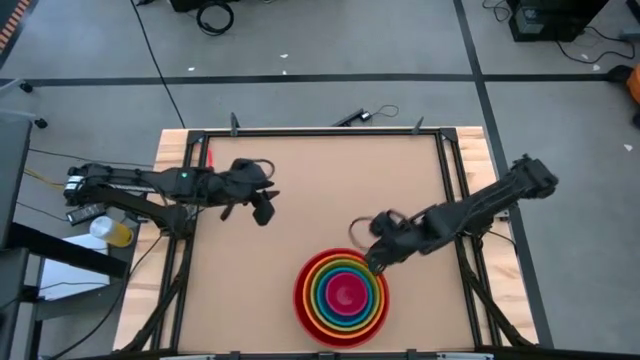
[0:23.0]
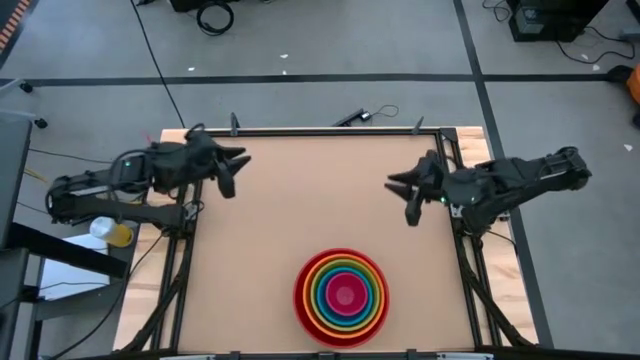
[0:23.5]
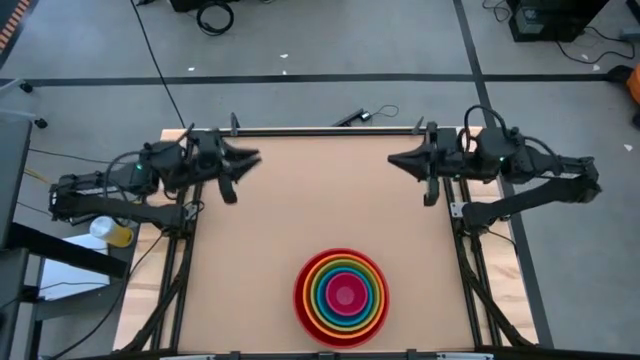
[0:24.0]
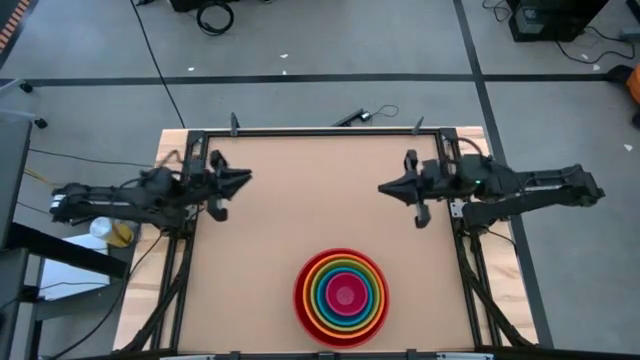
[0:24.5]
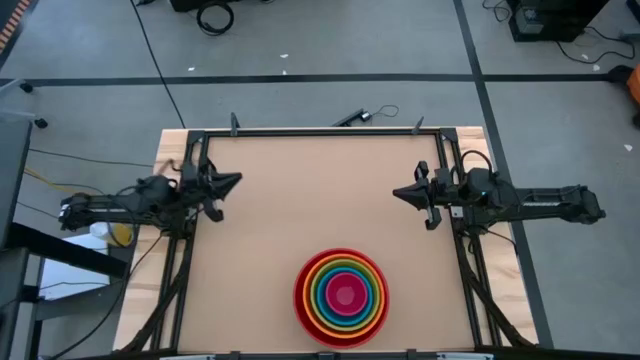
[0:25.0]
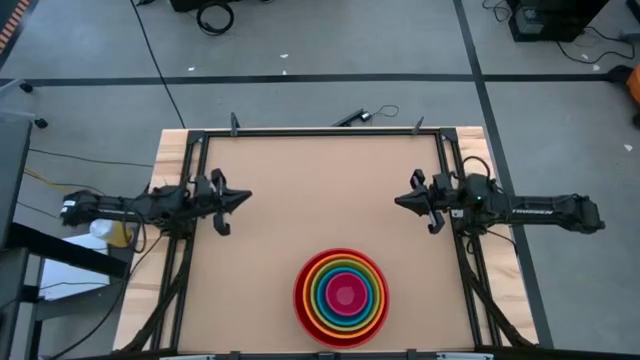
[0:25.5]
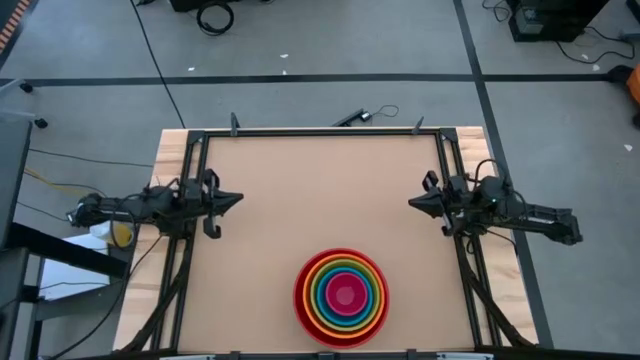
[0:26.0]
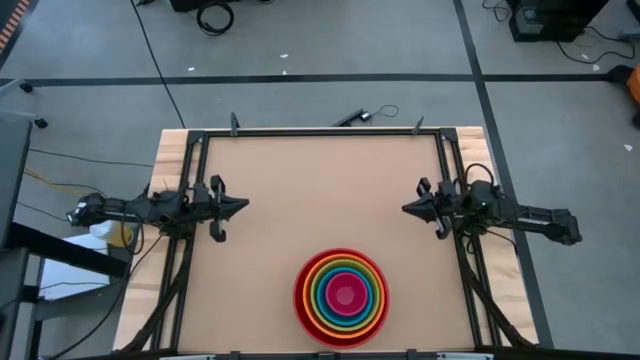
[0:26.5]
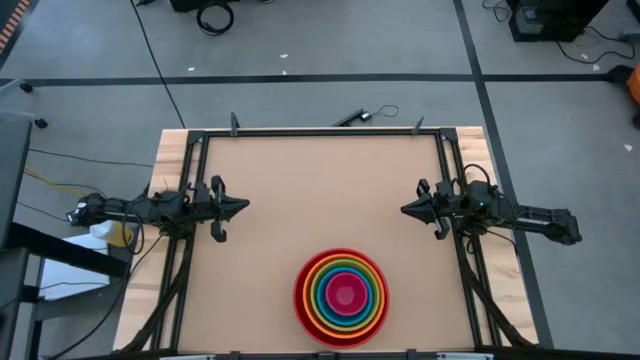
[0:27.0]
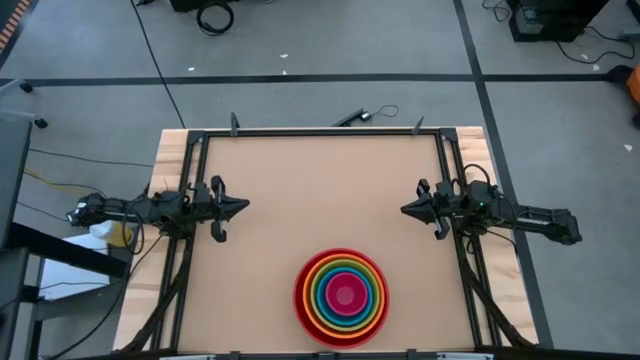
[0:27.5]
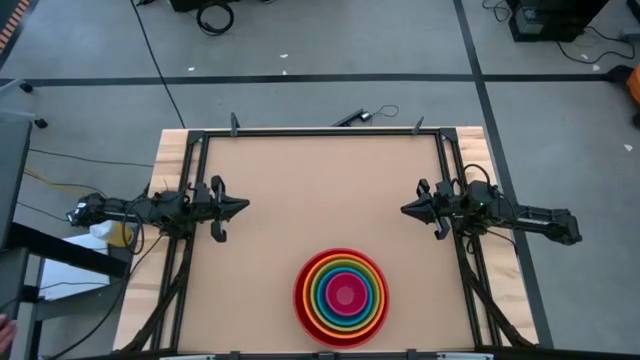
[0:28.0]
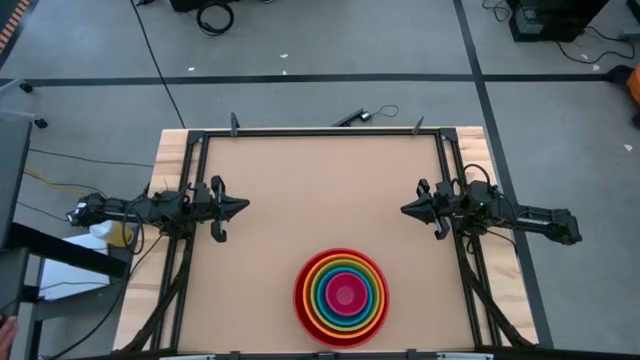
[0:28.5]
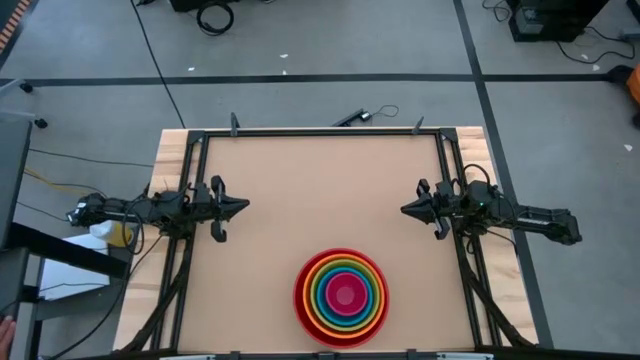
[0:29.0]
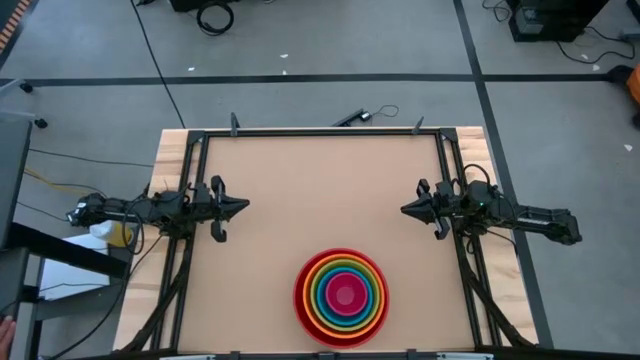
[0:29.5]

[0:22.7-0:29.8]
Return to Home Position

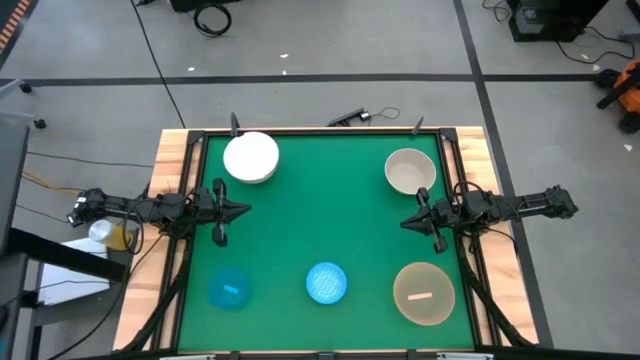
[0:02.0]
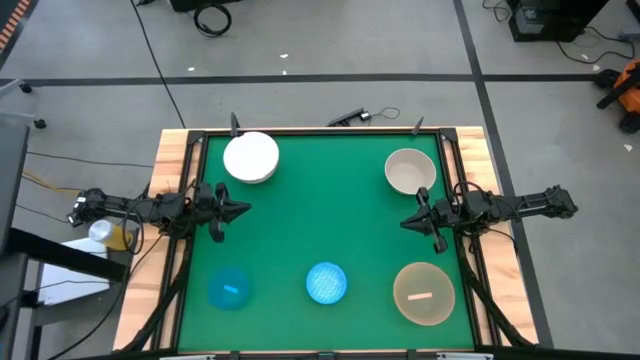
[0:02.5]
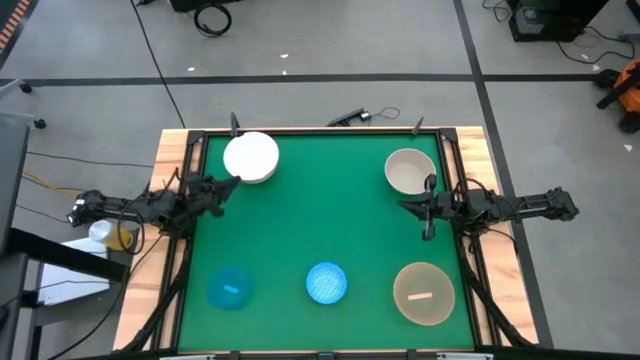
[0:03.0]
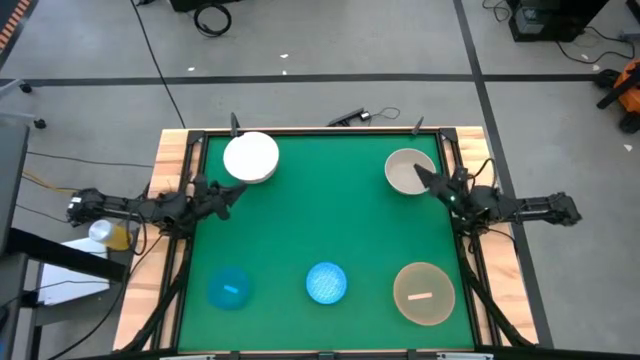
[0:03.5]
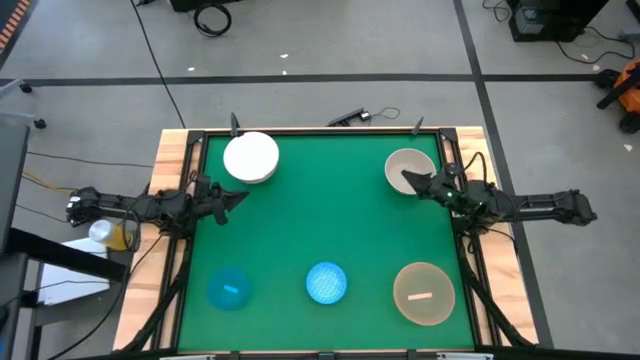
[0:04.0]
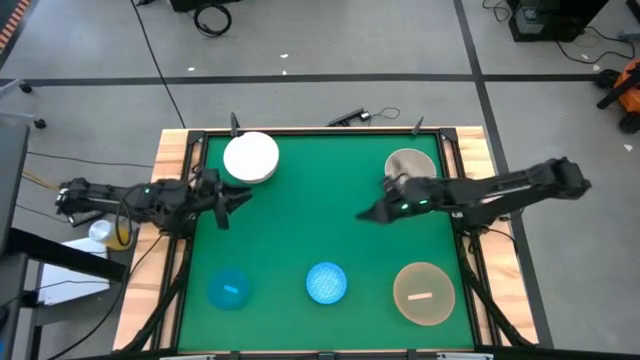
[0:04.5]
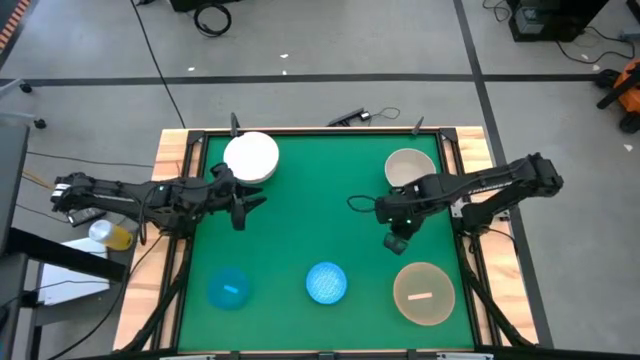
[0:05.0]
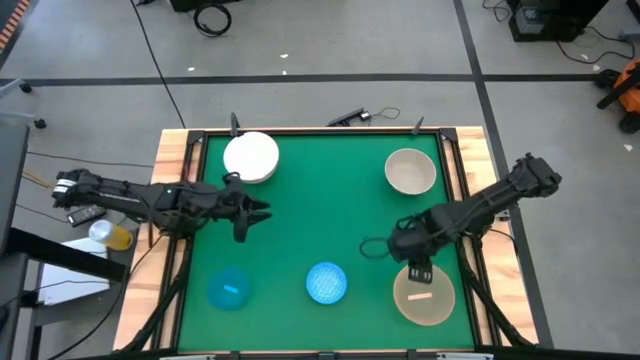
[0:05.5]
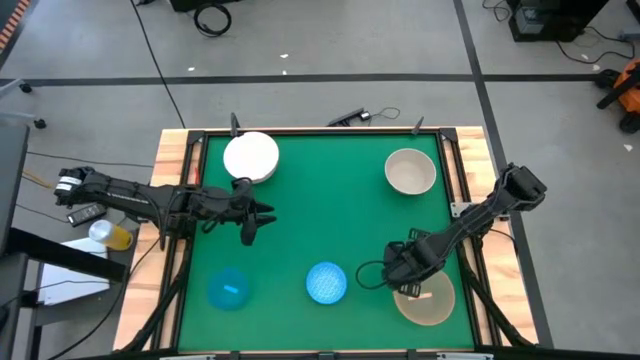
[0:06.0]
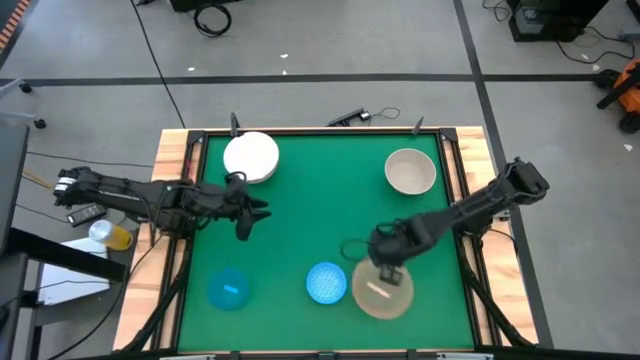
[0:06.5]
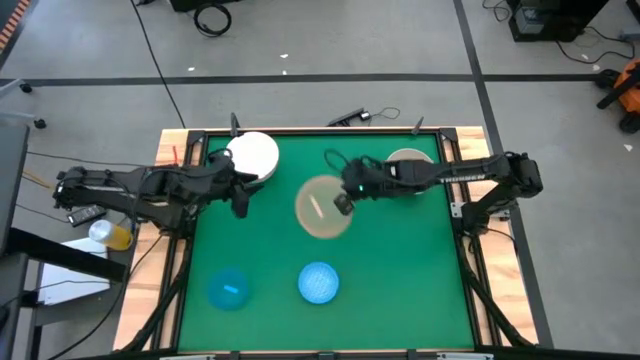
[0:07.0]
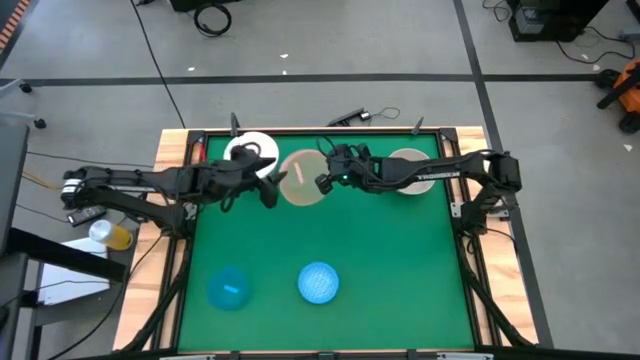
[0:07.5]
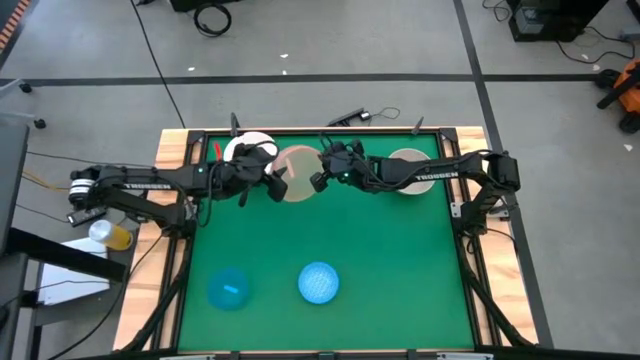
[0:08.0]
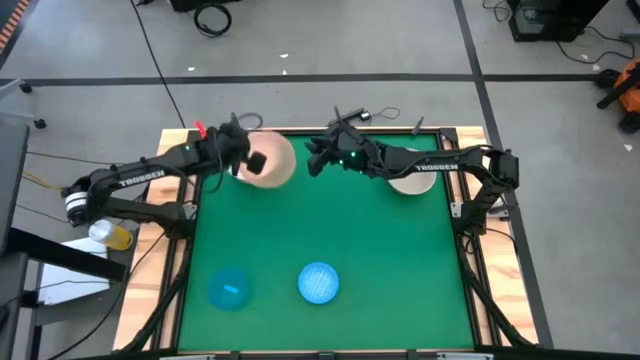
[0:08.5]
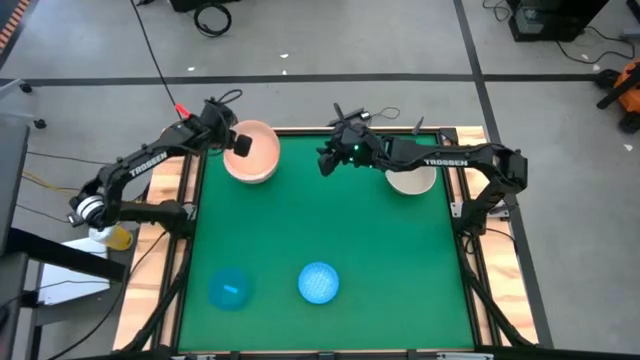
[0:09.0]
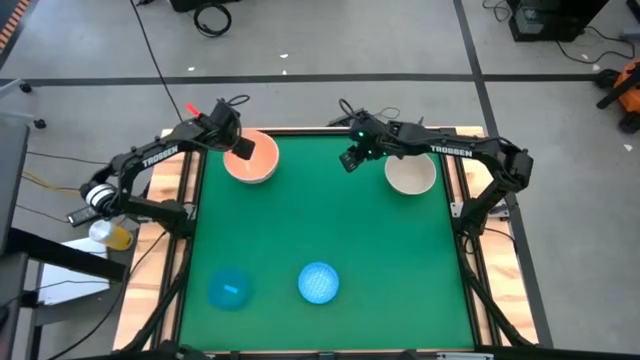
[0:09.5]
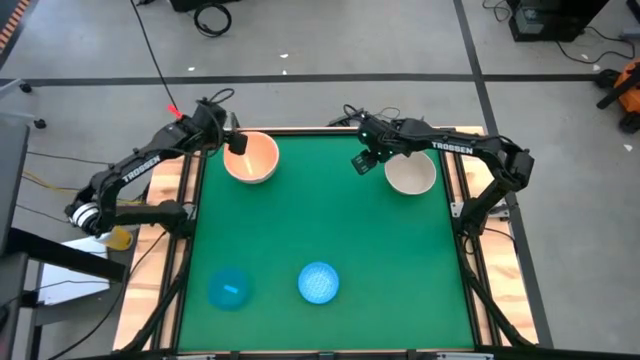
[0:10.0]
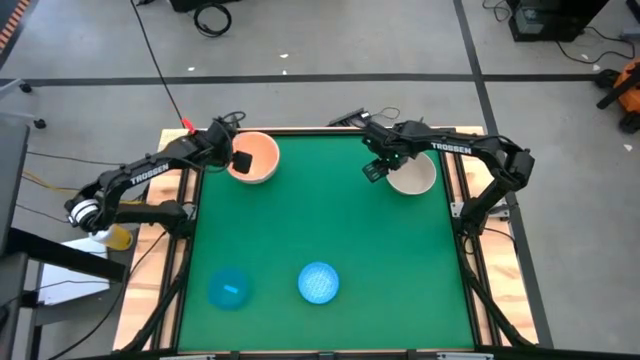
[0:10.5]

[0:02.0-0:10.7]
Stack the transparent light orange bowl on top of the white bowl

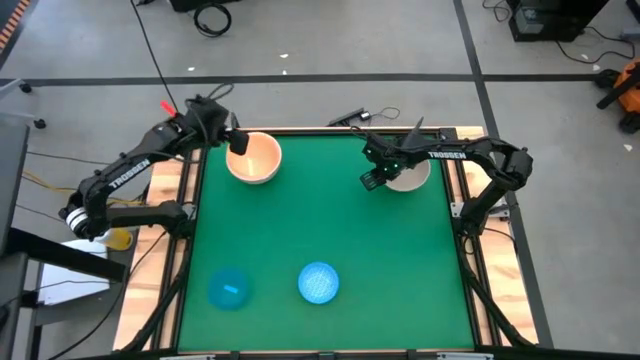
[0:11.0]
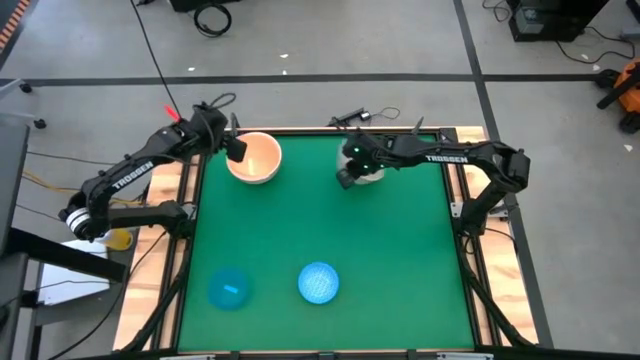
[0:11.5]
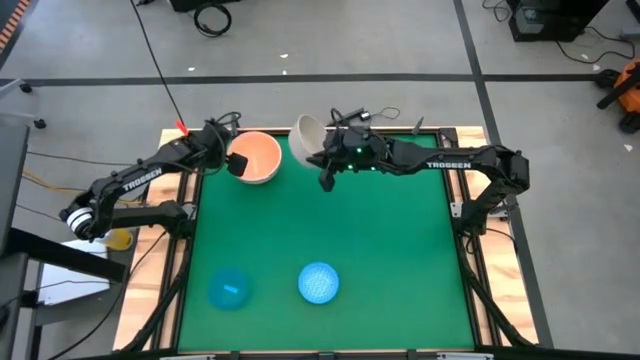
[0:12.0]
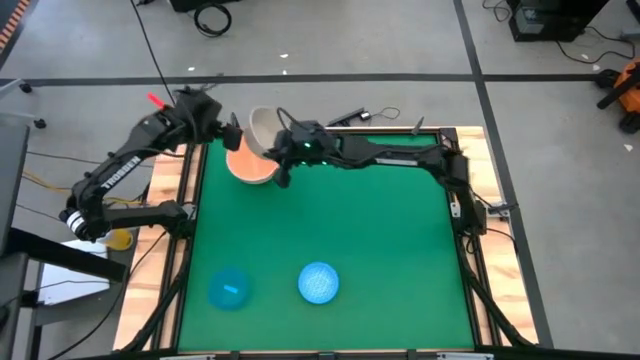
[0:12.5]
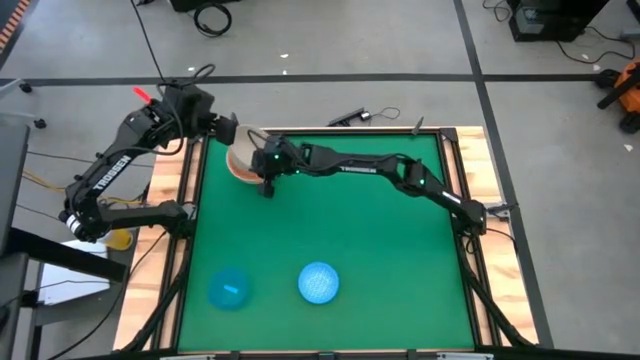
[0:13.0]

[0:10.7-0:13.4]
Stack the grey bowl on top of the transparent light orange bowl

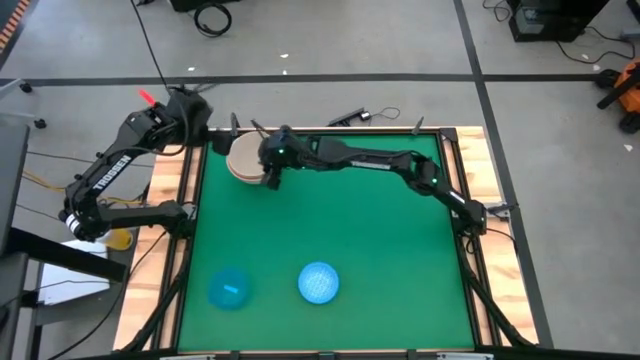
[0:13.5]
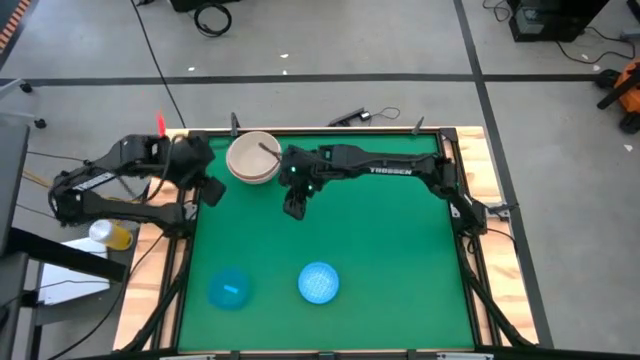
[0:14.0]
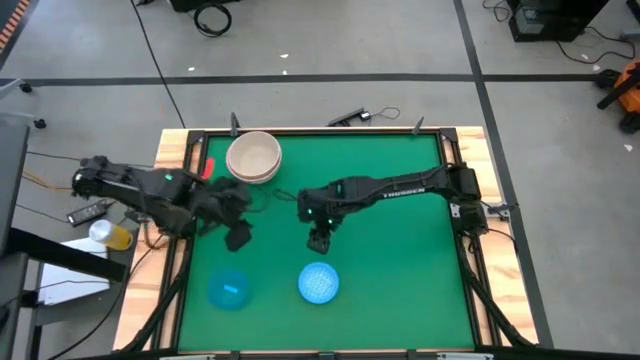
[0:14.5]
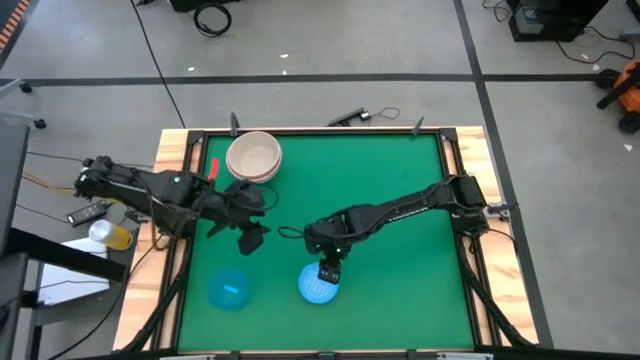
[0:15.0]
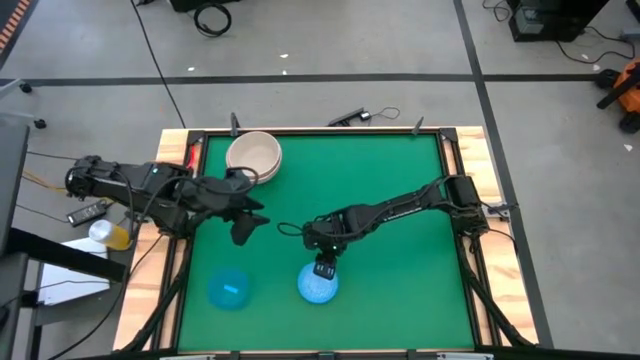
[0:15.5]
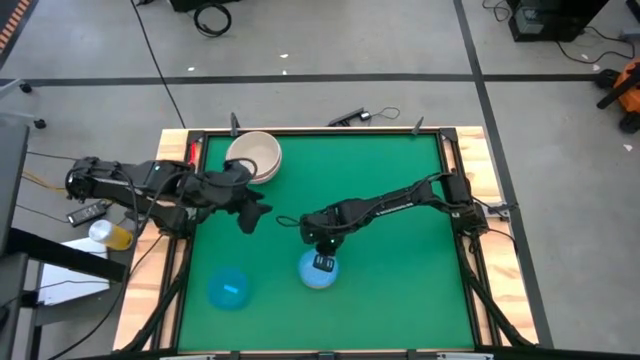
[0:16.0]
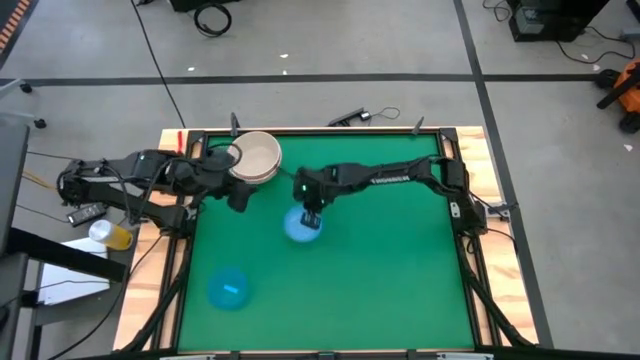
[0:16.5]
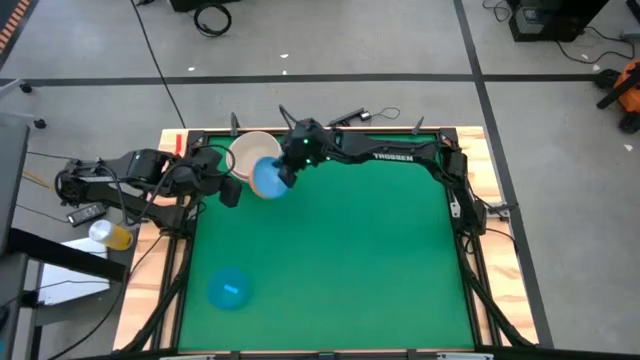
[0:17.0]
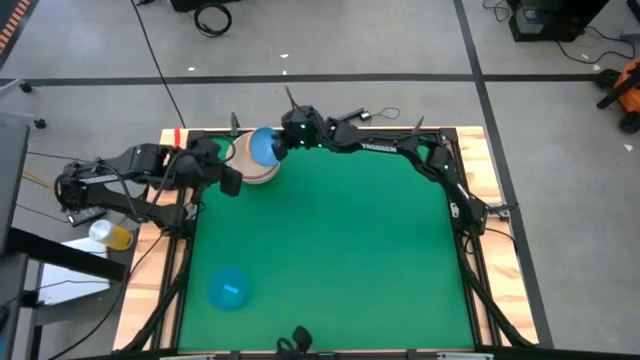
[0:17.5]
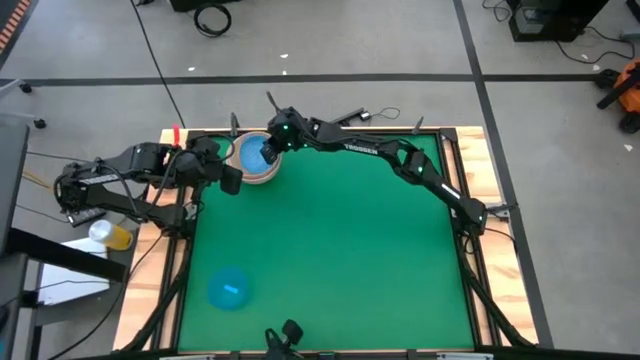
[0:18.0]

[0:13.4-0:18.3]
Stack the blue bowl on top of the grey bowl
